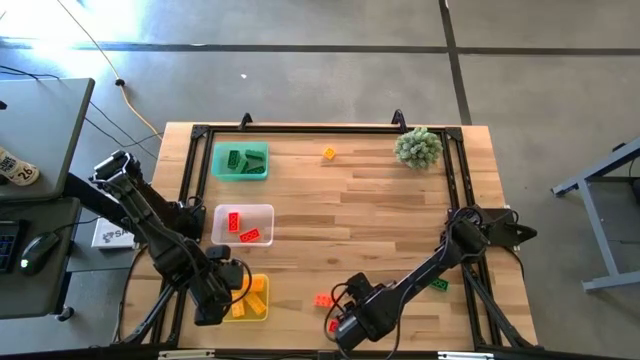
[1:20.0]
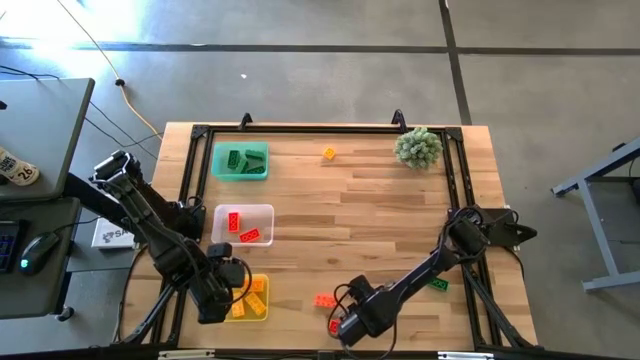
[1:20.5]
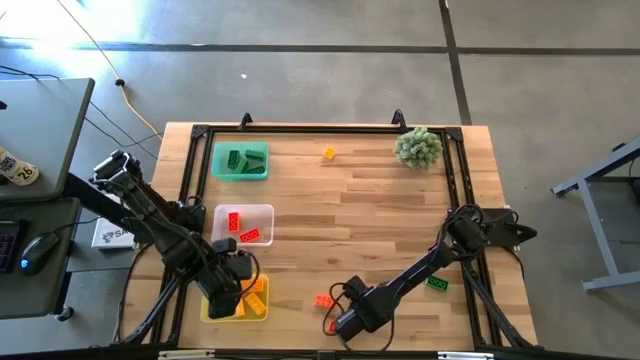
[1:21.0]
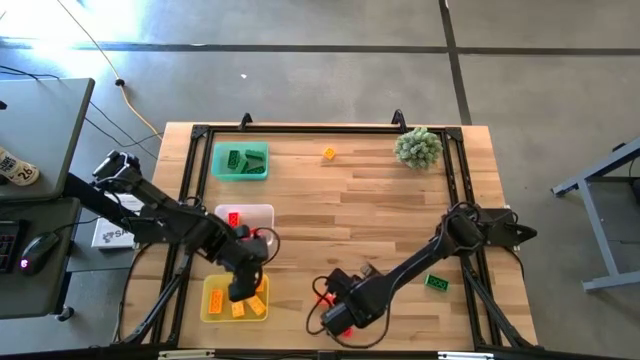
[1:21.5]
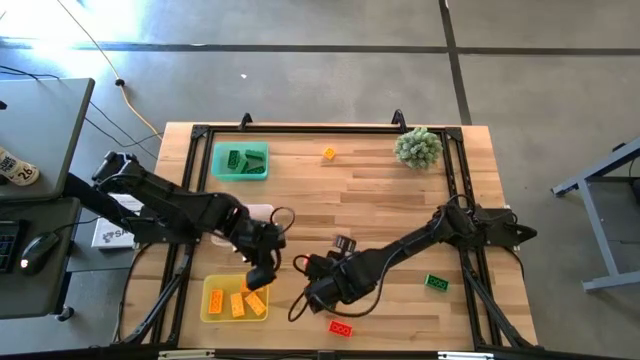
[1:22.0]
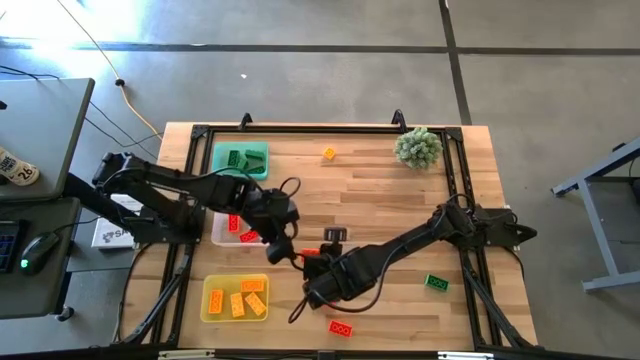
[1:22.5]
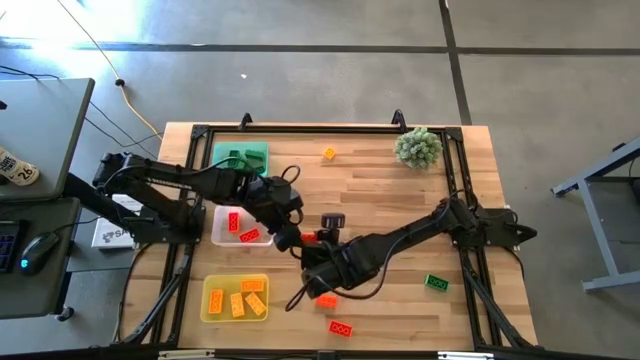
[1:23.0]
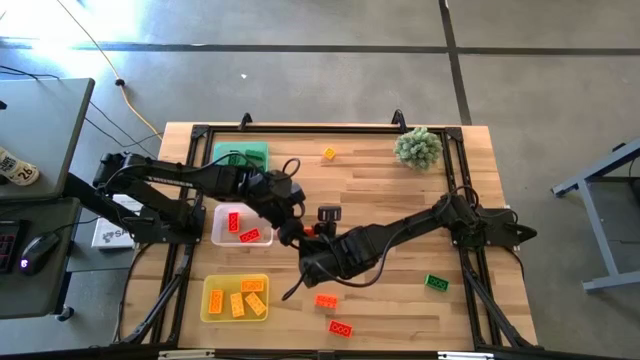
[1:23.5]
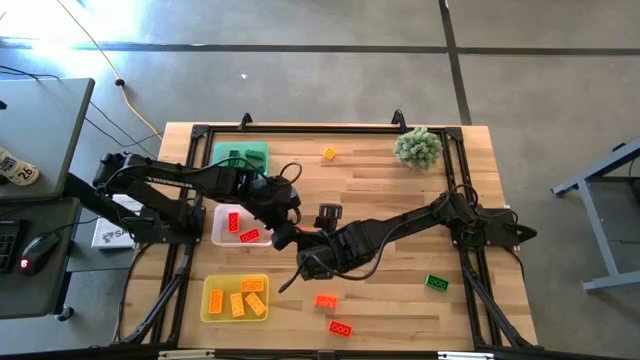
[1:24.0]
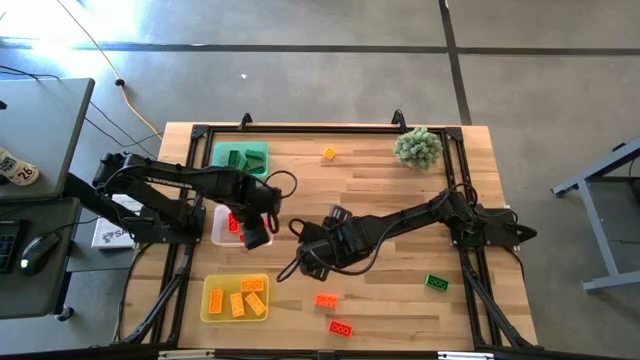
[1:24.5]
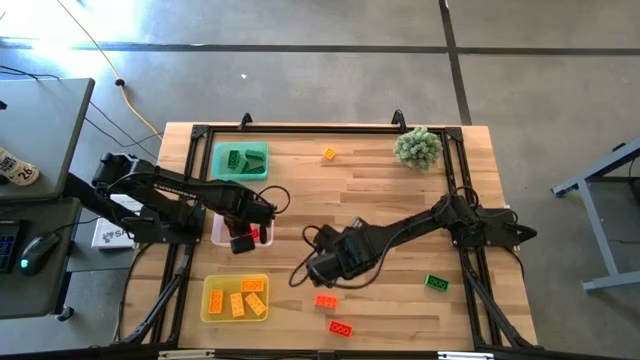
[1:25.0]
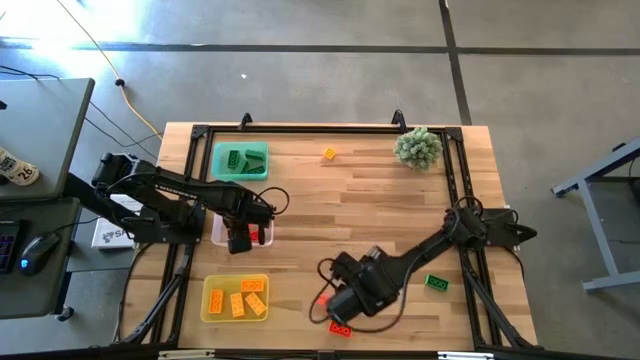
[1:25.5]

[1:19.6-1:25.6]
Task: Sort & place blocks by color
Put the orange game piece into the orange bin

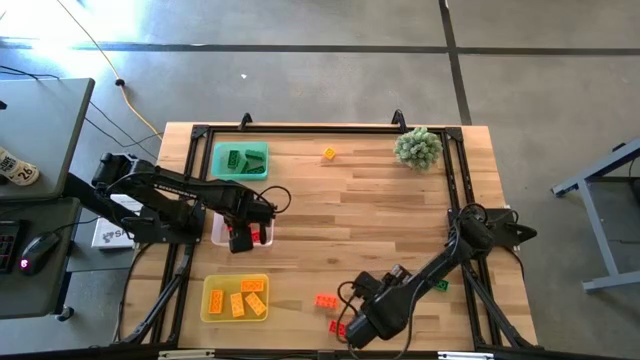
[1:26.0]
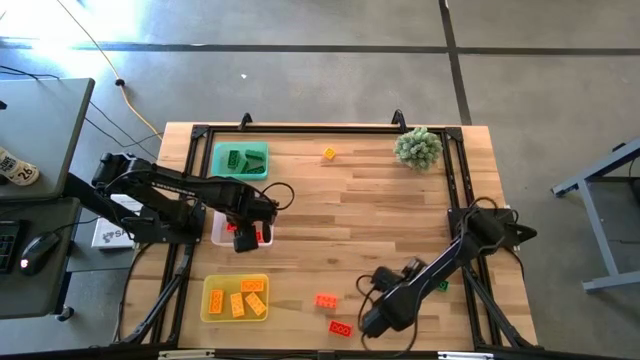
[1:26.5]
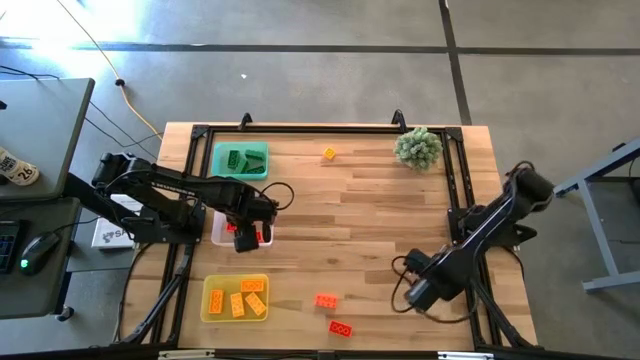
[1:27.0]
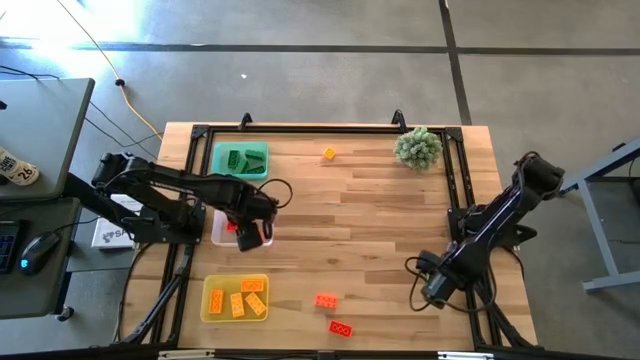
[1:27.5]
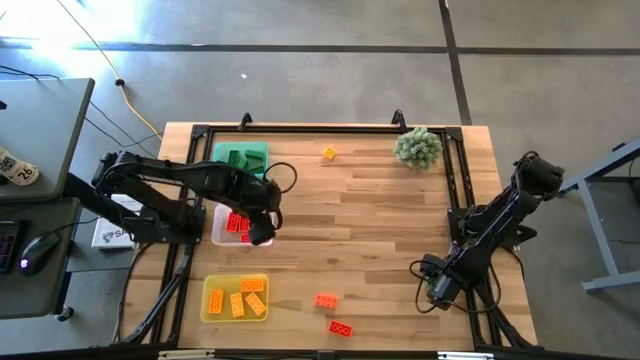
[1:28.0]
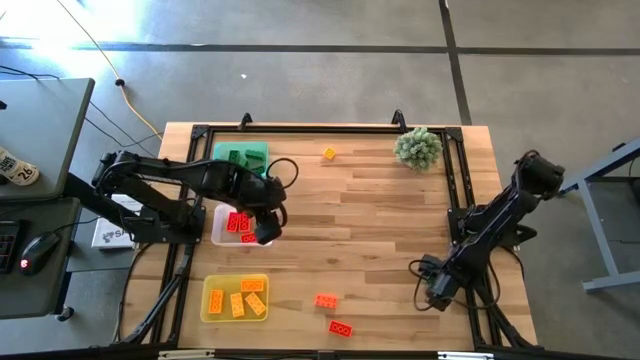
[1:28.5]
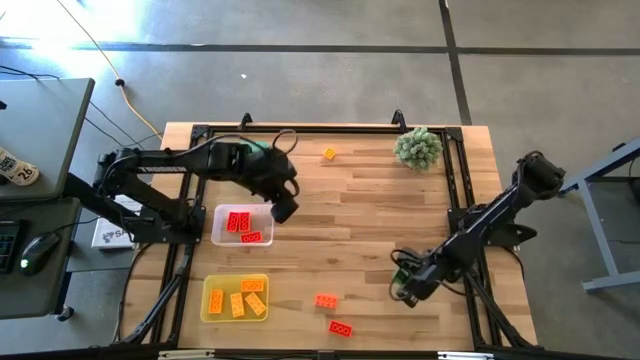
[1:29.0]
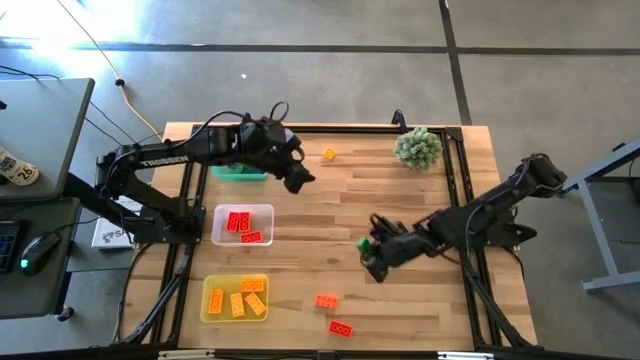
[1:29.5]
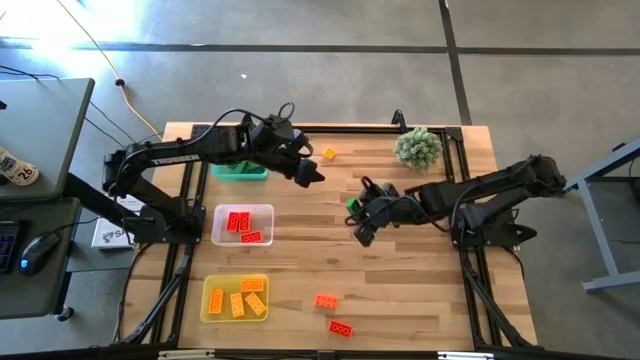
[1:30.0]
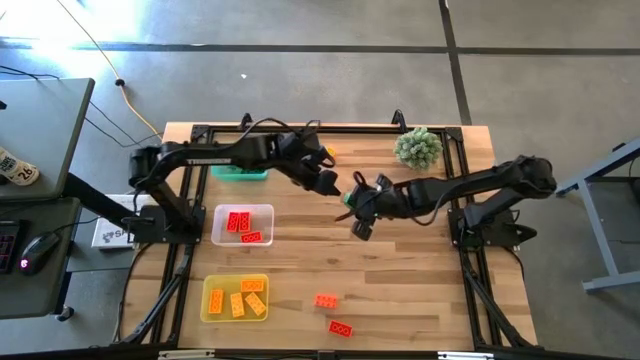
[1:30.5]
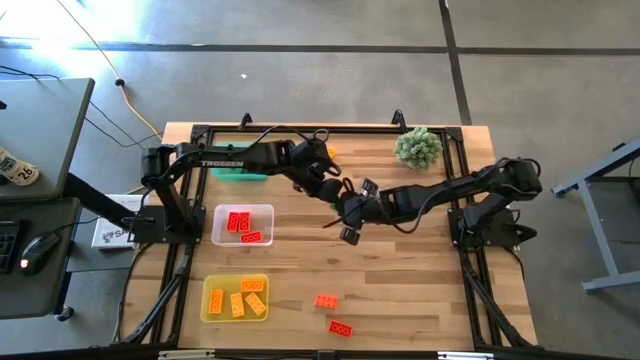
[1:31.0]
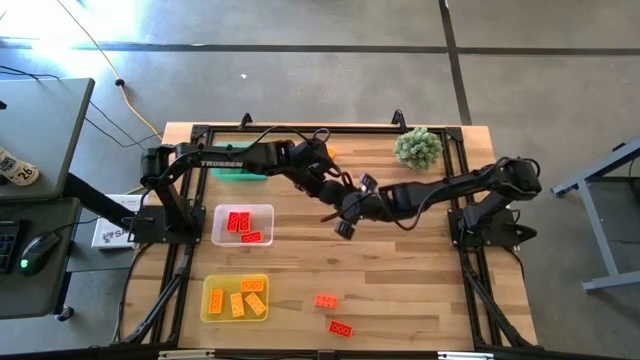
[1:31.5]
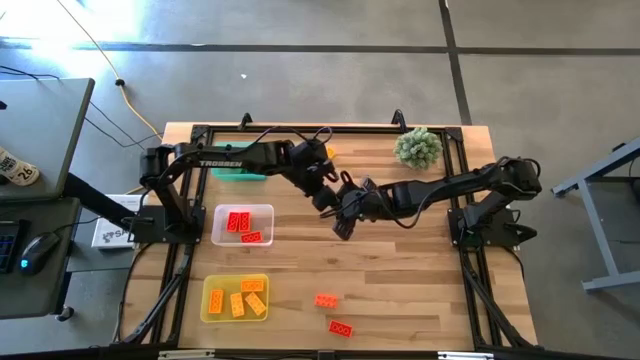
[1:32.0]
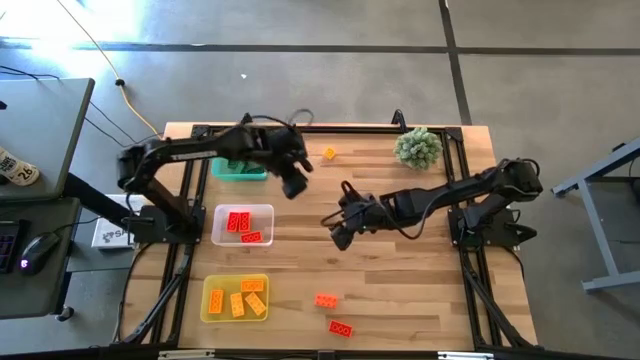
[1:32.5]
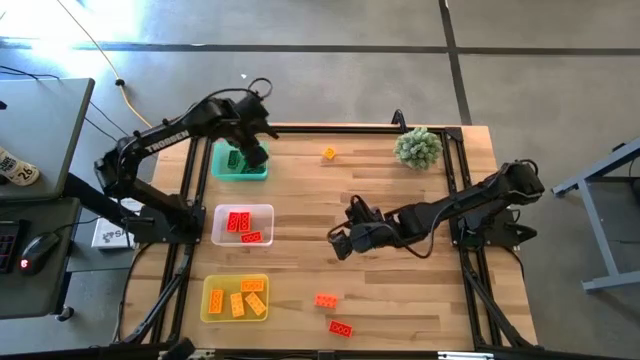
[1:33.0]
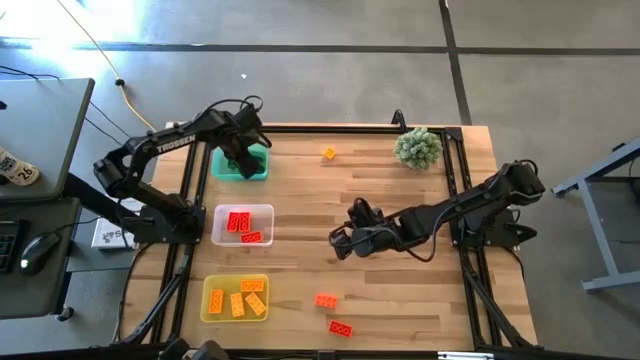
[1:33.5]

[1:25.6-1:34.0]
Put the green game piece into the green bin

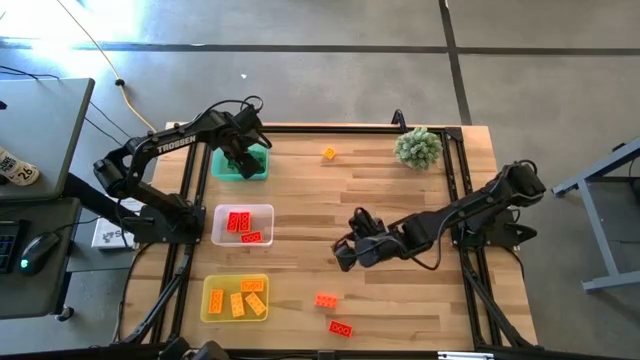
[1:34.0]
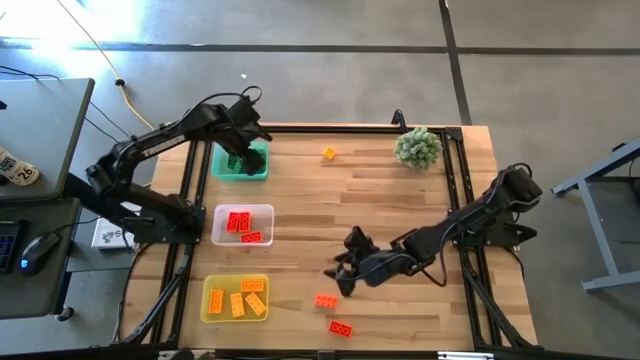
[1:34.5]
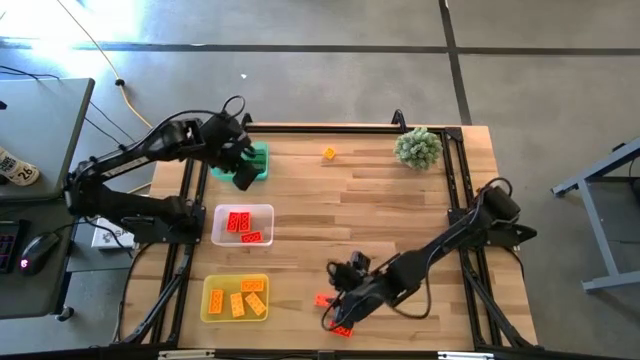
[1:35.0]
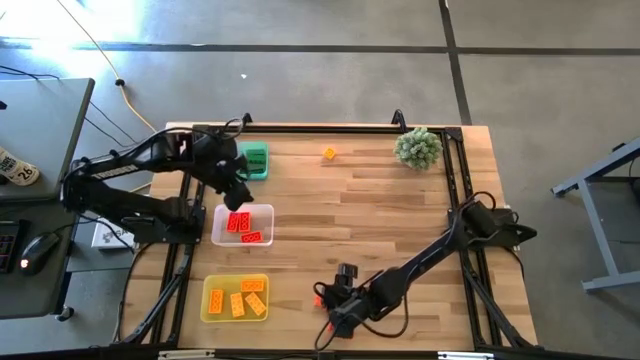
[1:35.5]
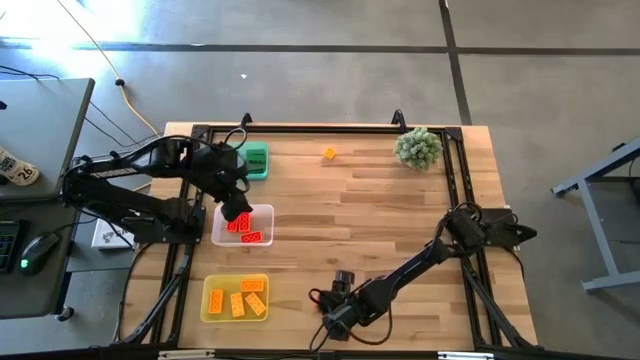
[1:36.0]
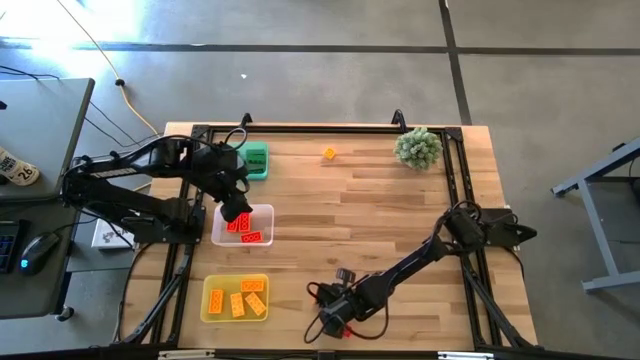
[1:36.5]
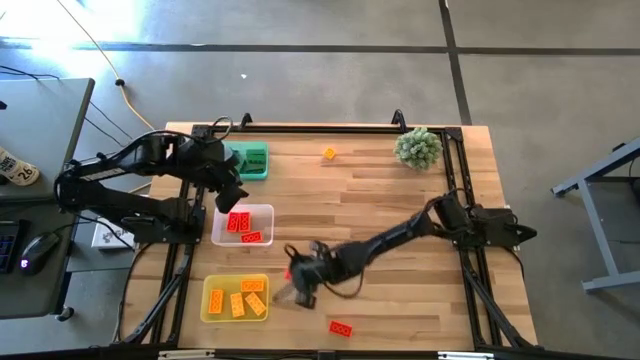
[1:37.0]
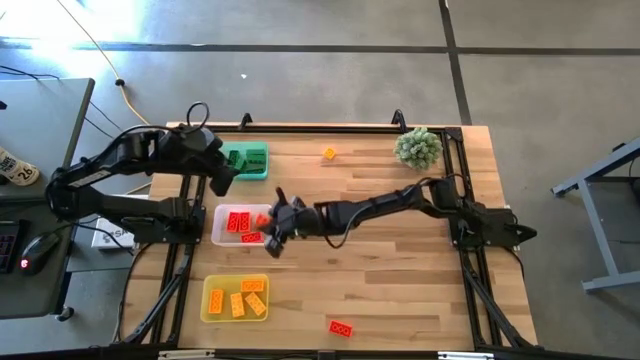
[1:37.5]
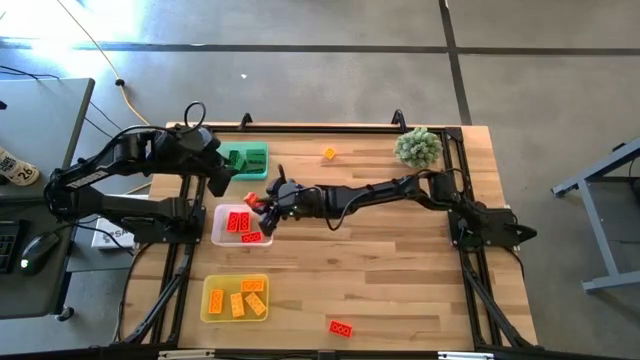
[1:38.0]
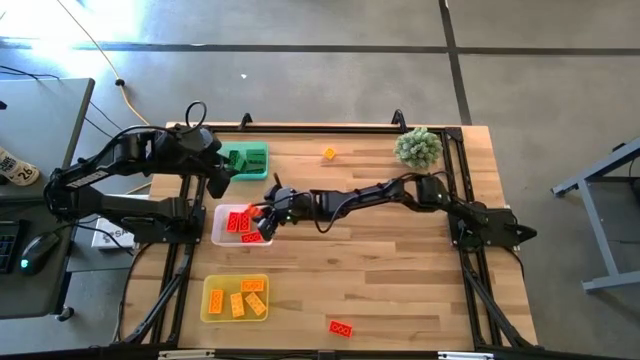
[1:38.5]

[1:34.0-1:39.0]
Put the orange game piece into the white bin

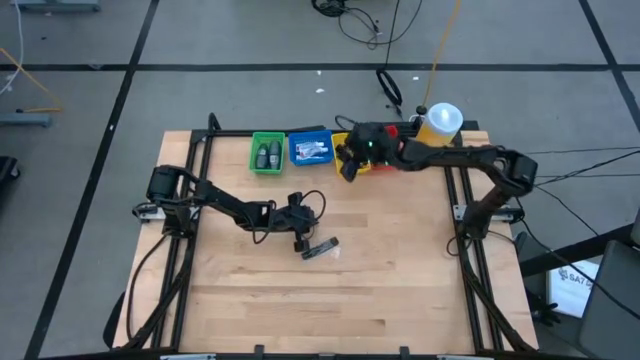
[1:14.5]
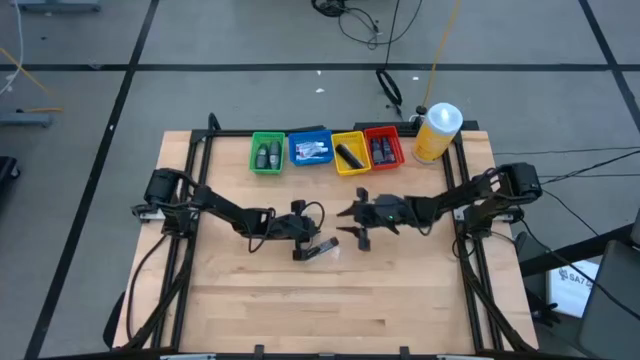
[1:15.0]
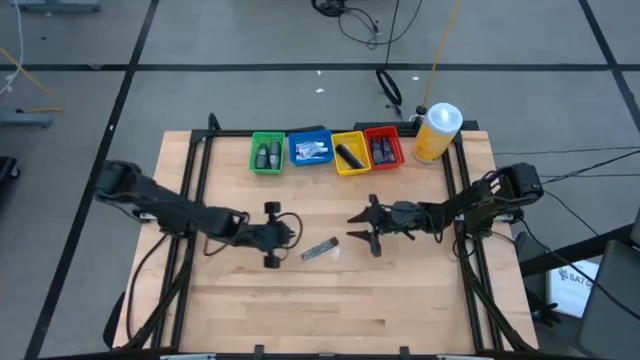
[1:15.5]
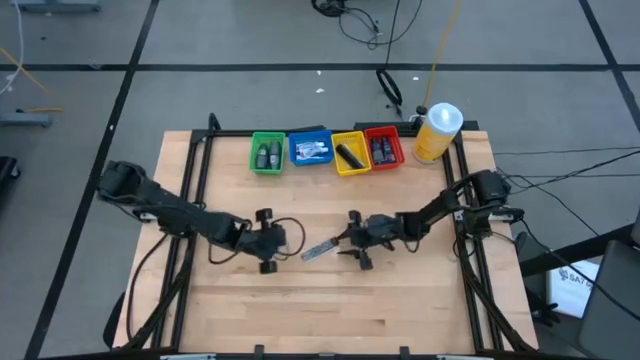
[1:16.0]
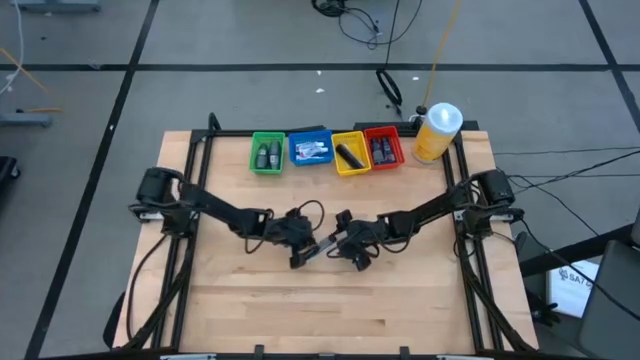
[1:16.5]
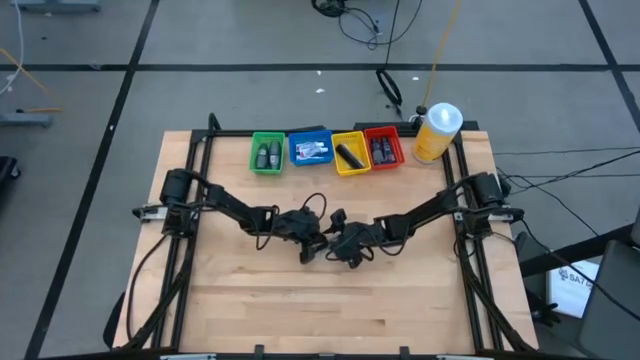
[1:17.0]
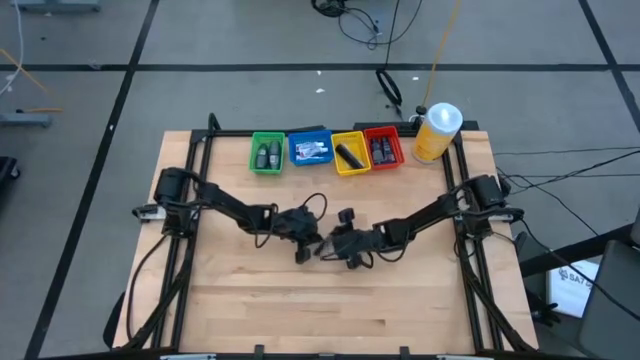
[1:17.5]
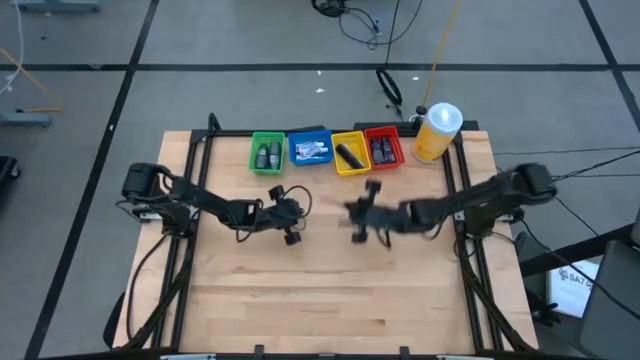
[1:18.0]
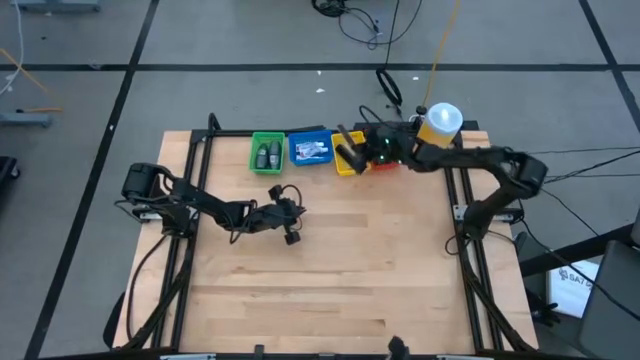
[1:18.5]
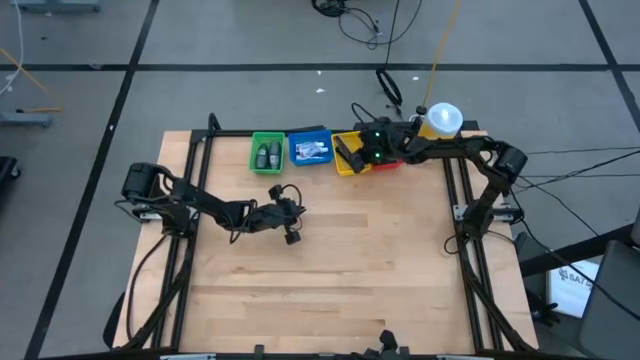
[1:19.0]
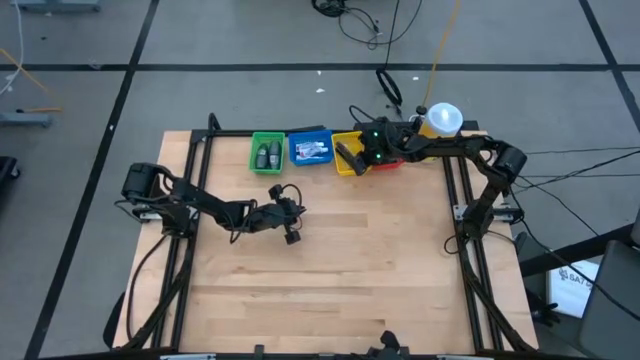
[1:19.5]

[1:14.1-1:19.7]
Task: Pick & Place Travel size toiletries
Put the black comb into the yellow bin
